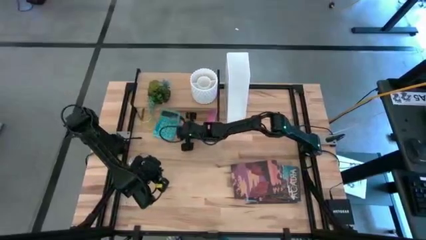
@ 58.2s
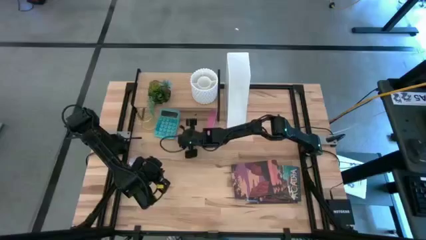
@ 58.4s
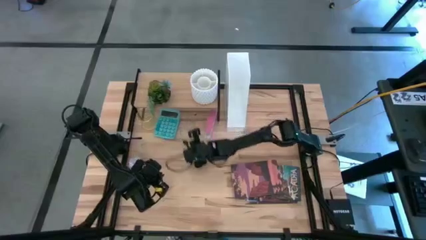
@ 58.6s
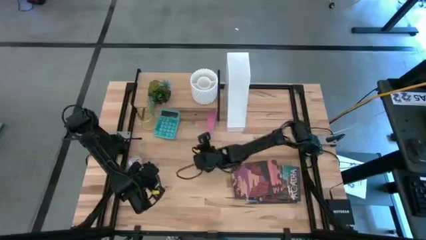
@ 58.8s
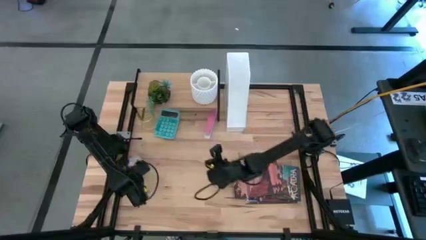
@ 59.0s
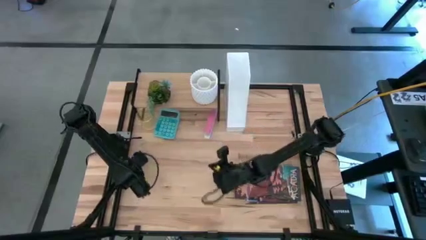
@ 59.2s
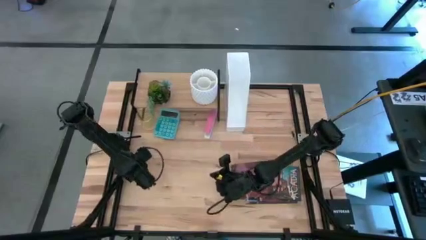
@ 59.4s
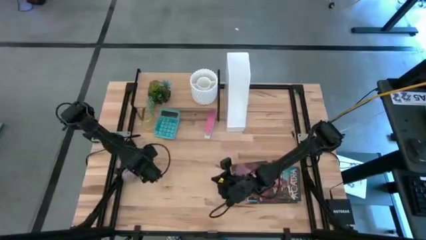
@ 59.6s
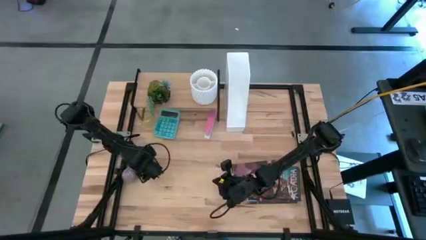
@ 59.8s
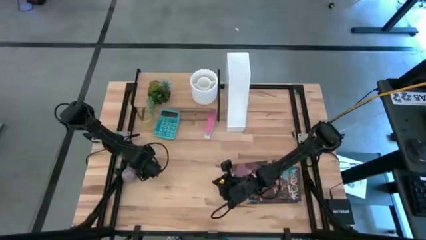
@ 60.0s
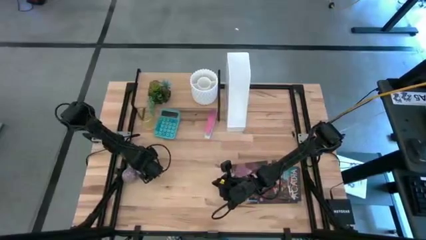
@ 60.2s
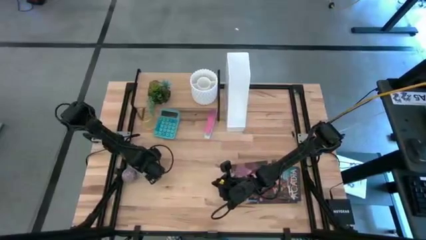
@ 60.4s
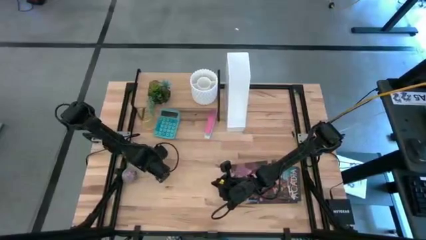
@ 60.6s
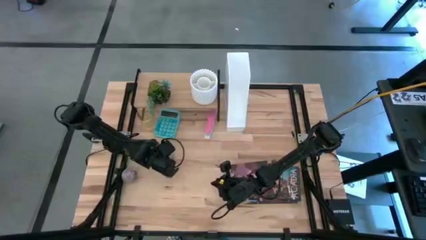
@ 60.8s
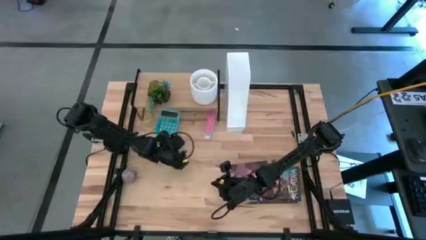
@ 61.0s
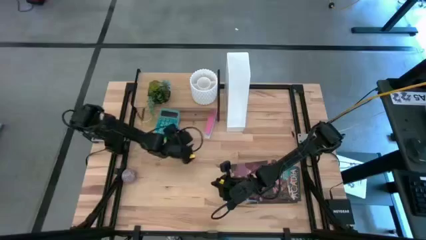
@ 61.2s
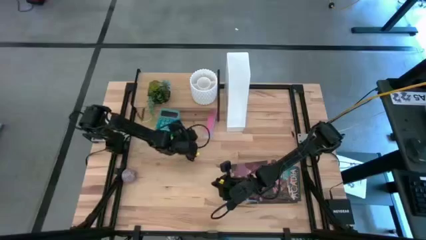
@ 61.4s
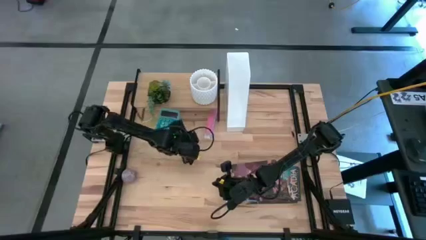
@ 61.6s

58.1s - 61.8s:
Task: Stock shelves
Put the gray scented candle under the shelf

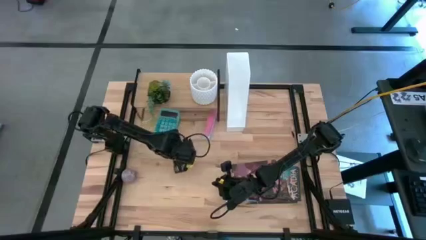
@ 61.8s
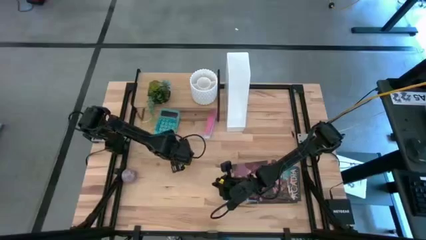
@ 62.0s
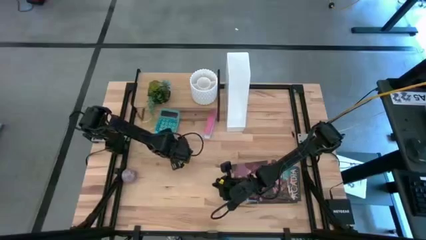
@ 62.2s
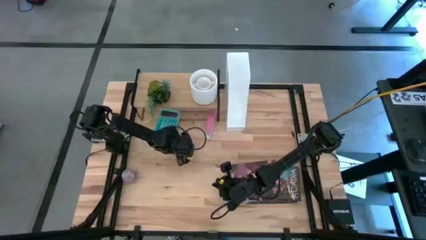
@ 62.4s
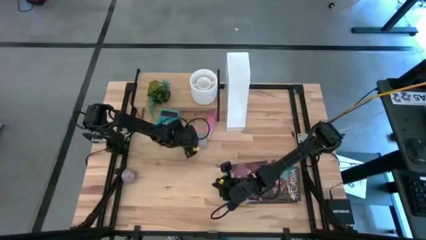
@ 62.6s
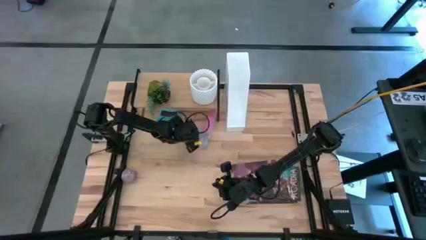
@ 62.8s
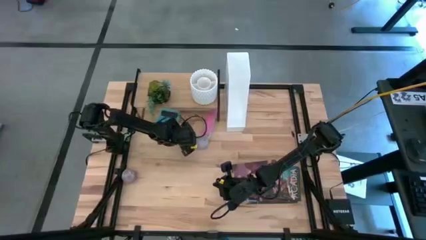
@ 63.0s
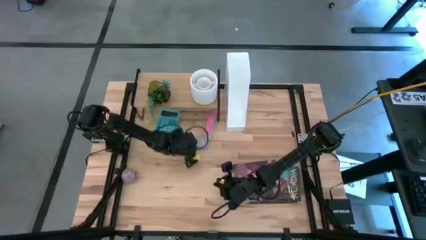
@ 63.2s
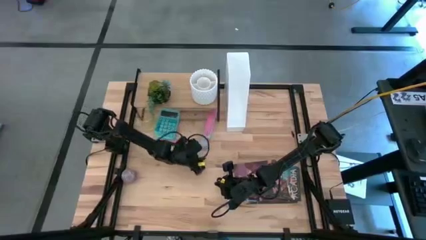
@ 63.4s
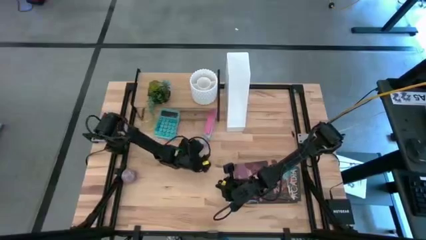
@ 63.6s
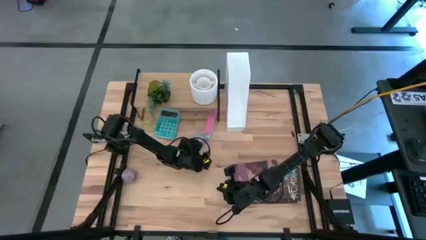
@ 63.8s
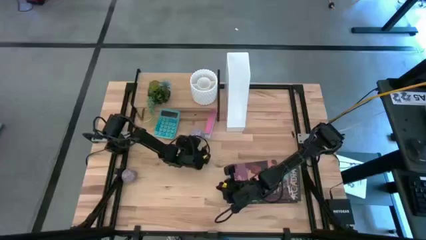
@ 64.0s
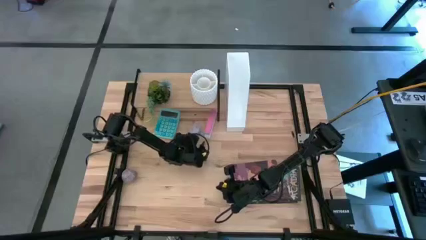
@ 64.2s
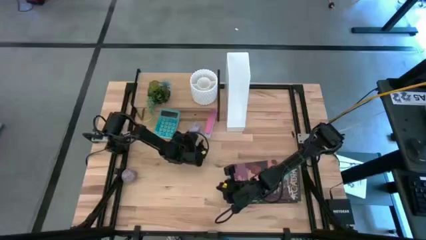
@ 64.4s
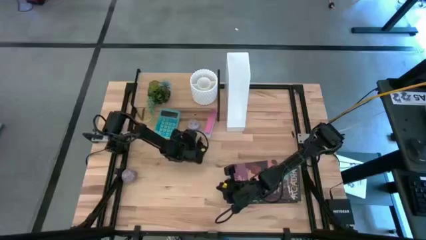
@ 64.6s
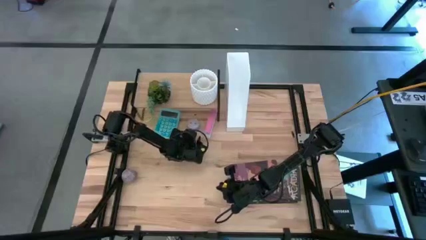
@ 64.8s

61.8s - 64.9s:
Put the gray scented candle under the shelf

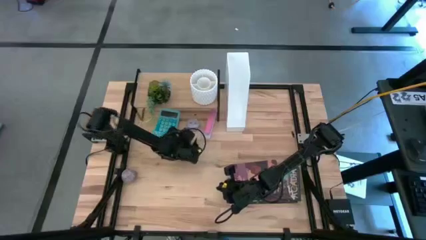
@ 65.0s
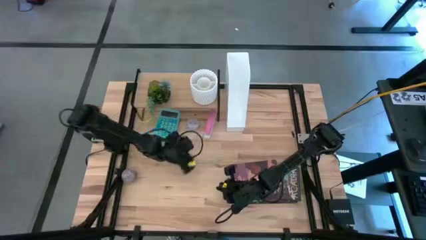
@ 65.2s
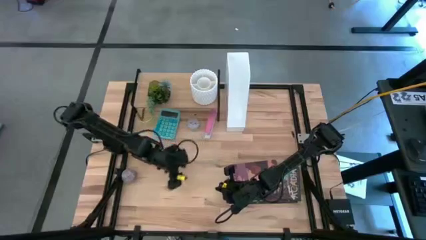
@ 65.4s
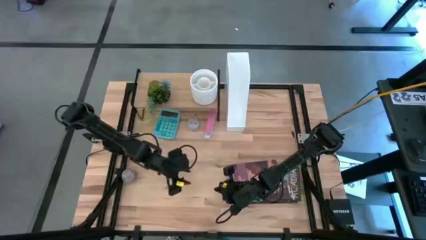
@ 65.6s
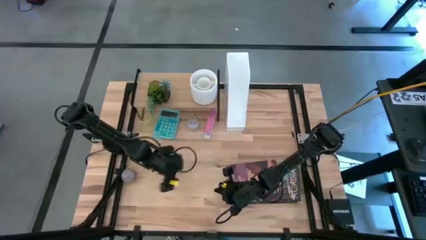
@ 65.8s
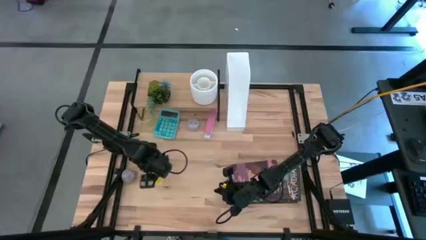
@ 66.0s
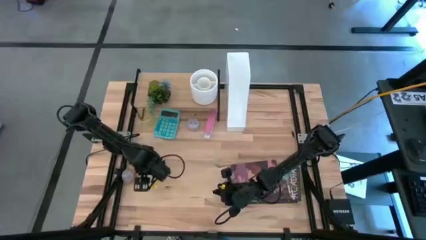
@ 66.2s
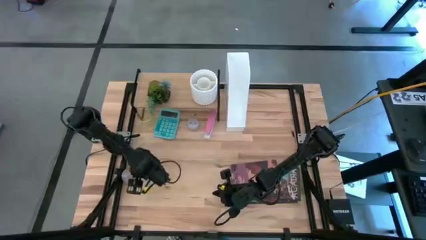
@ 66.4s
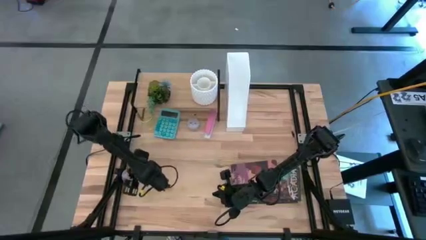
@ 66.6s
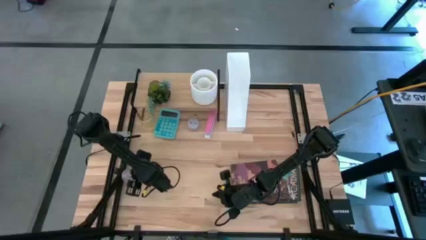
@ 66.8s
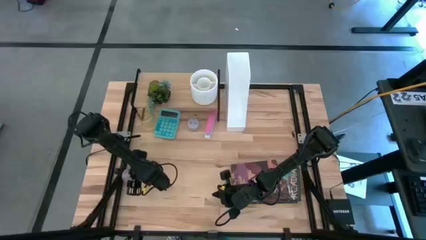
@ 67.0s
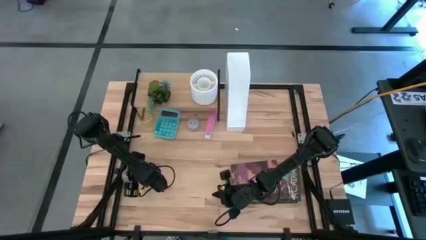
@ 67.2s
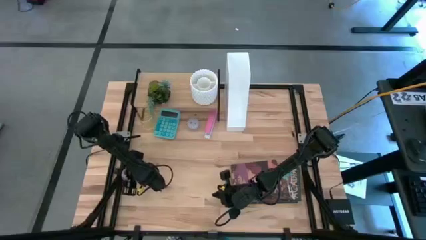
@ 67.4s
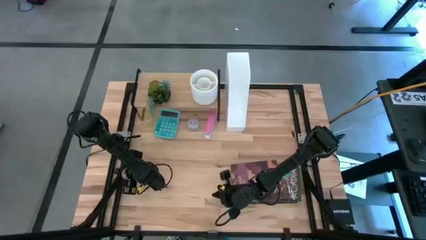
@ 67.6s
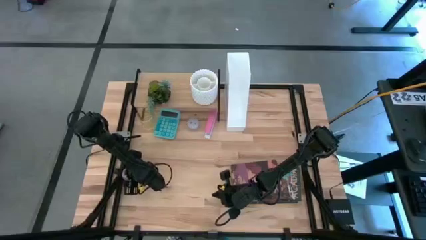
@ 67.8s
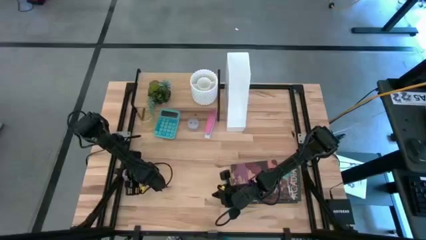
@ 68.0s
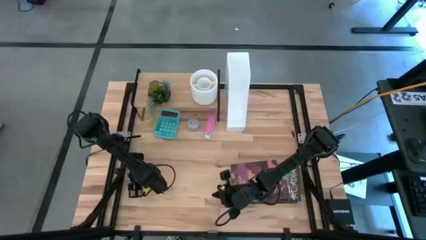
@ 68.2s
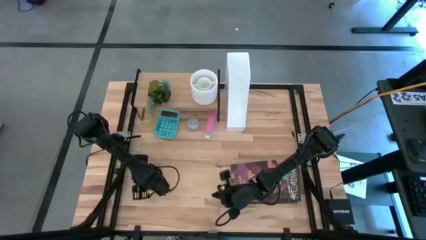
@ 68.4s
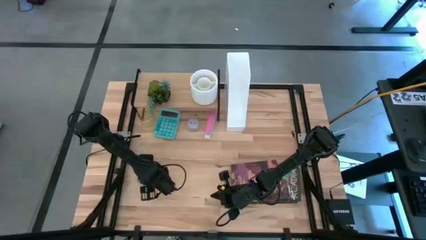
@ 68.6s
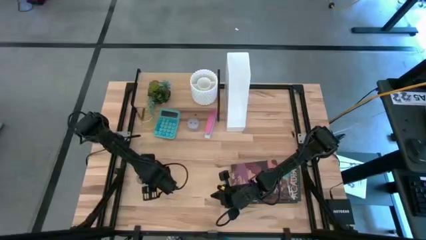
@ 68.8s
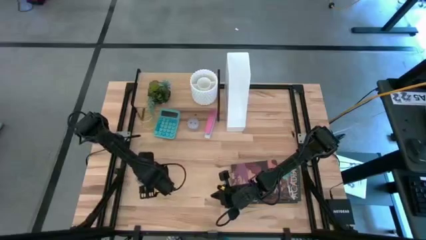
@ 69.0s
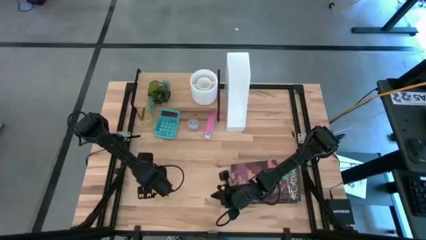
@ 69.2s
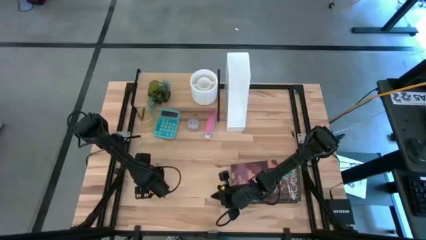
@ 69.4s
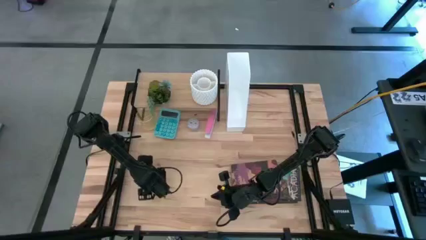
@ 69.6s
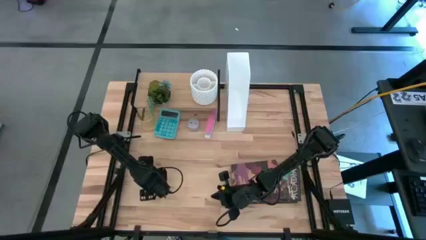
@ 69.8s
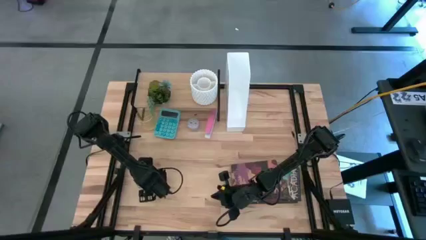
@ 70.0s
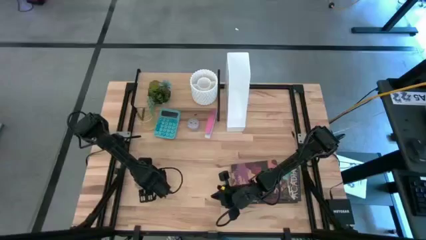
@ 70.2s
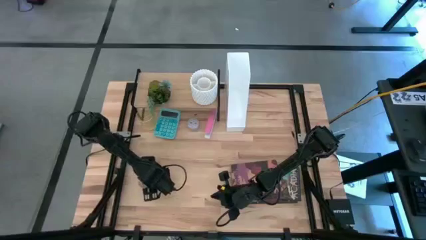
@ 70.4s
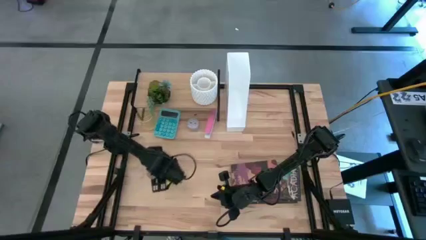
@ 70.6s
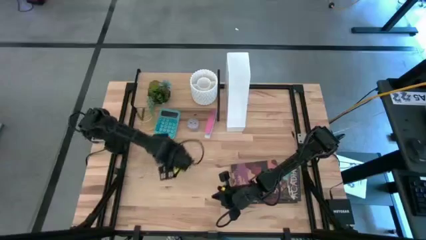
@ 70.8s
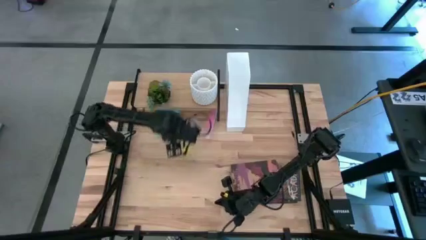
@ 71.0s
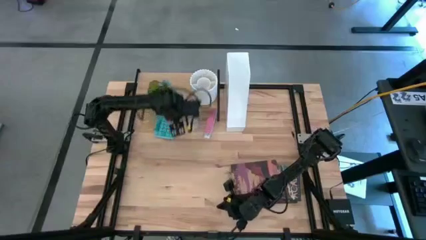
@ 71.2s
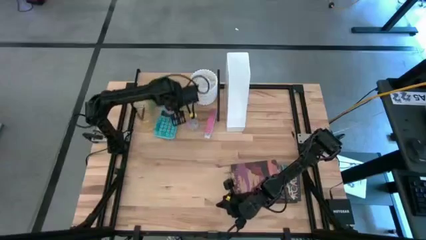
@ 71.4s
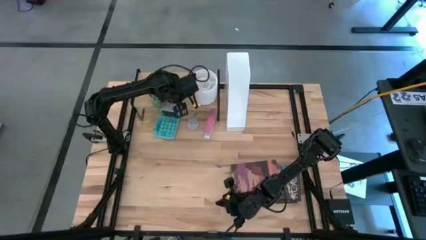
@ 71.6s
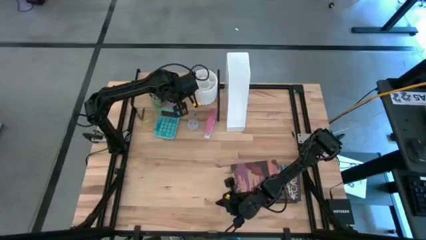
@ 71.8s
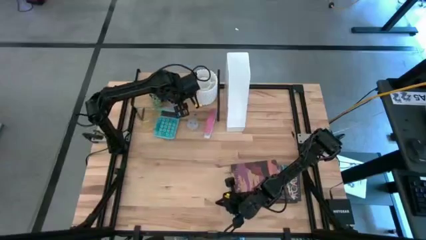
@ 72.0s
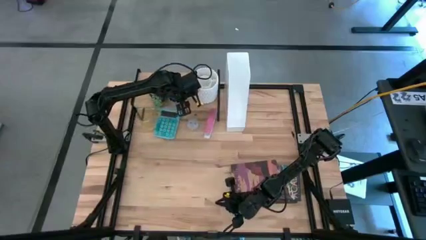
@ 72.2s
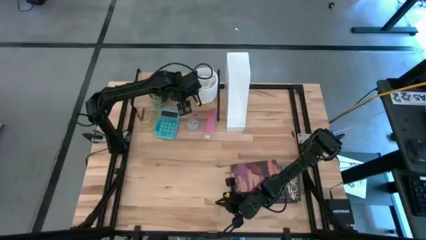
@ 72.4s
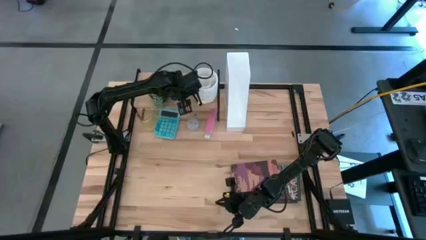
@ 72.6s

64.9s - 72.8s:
Put the red scented candle on the shelf

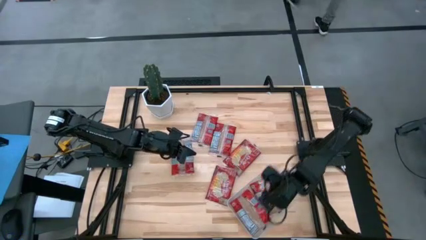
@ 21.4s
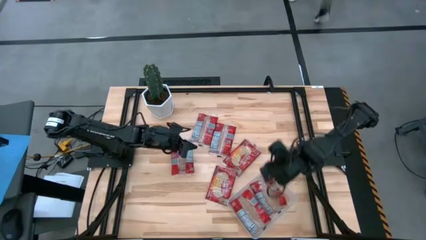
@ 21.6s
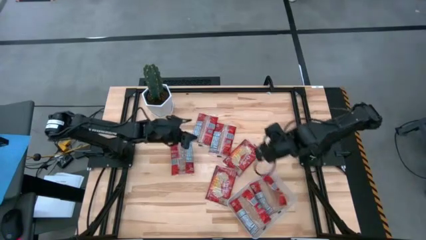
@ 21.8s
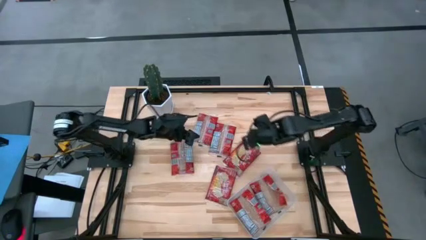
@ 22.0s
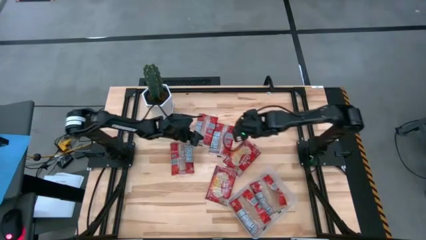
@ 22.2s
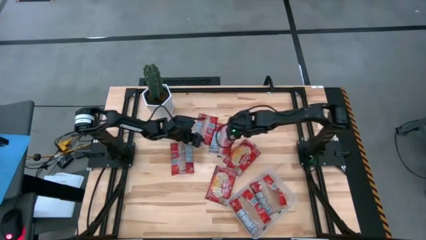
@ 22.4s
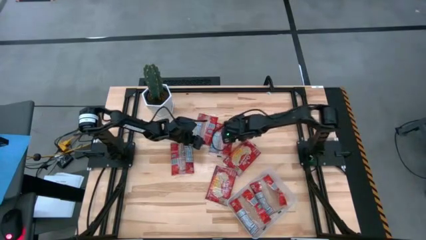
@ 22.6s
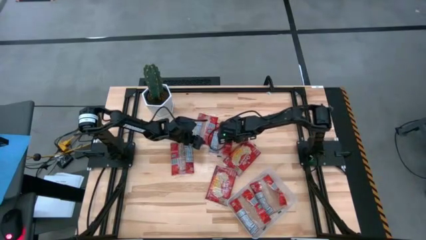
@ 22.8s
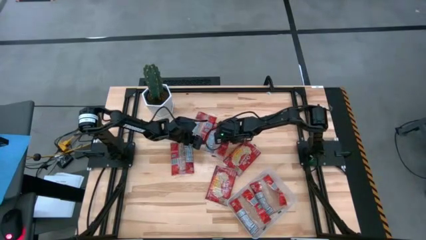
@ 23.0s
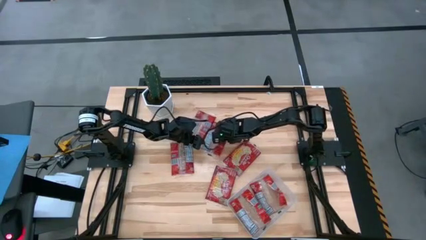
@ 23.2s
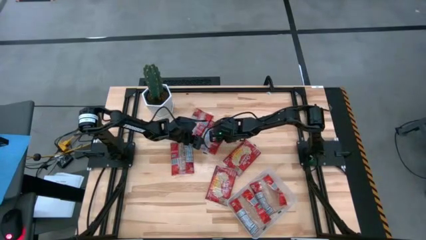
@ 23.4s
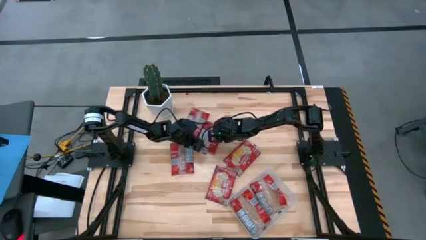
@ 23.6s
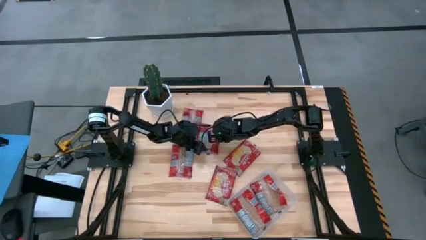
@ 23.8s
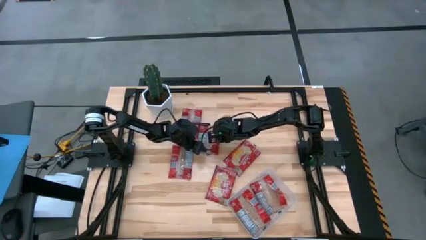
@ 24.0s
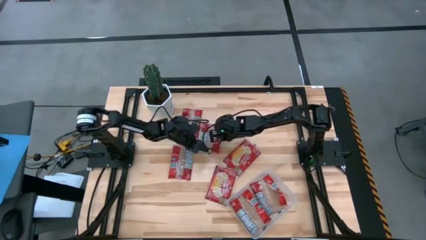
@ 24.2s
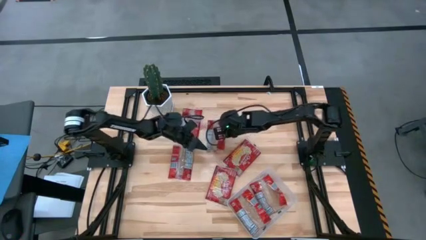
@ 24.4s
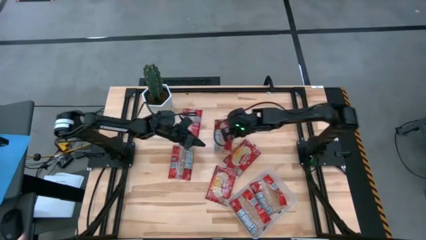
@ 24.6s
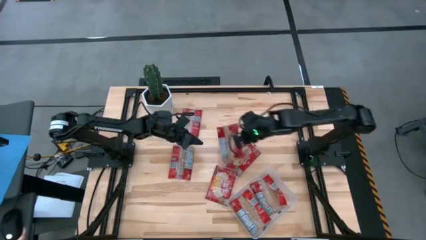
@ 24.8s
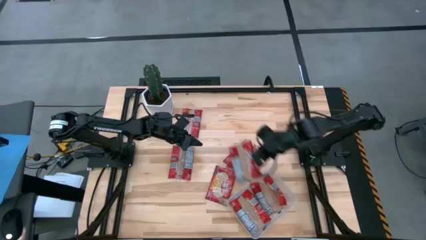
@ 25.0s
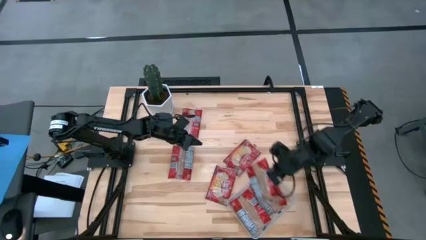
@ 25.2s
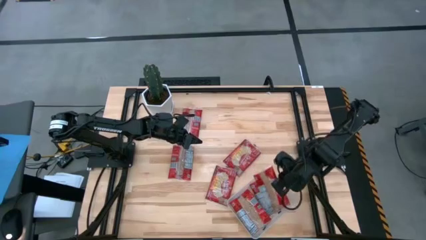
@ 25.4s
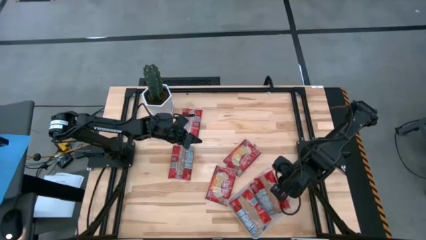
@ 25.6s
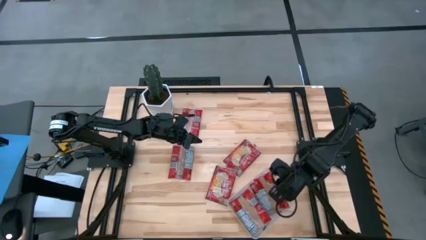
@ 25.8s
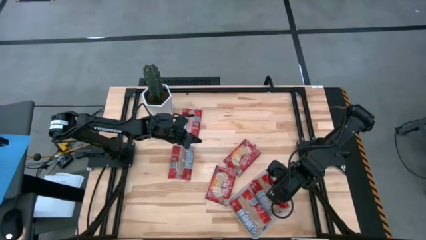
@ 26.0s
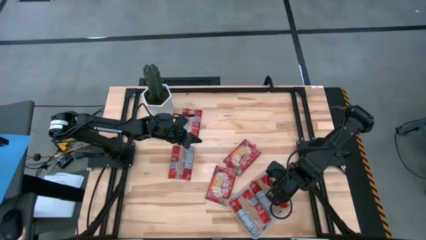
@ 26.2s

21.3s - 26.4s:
Task: Sort popcorn bags into baskets
Put the red popcorn bag into the transparent container
